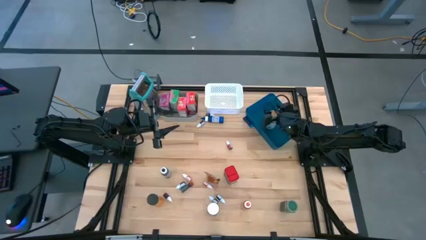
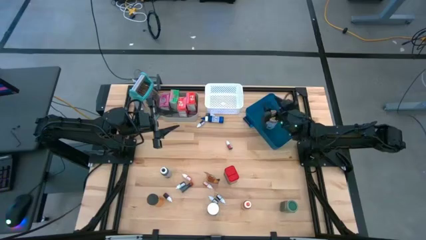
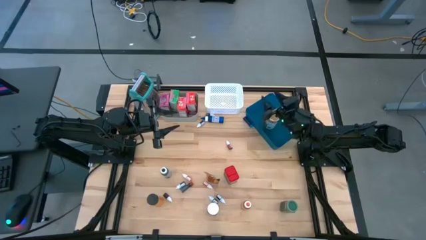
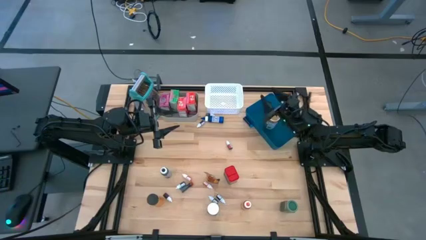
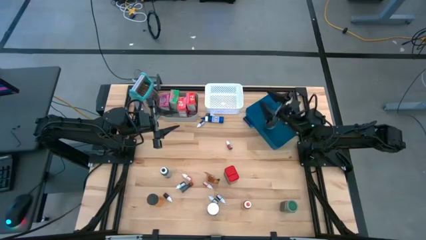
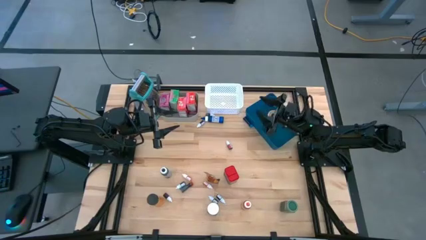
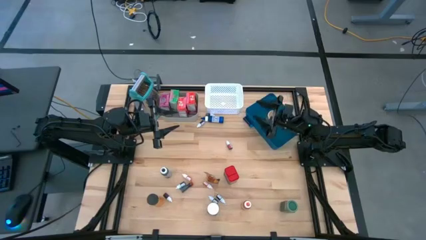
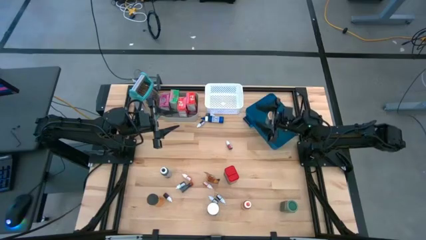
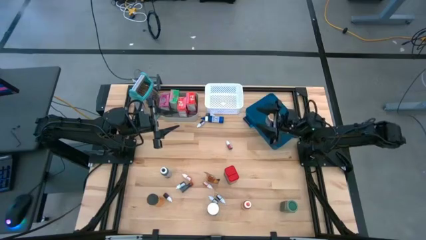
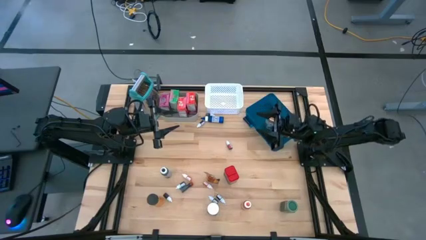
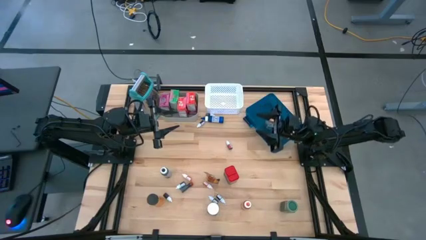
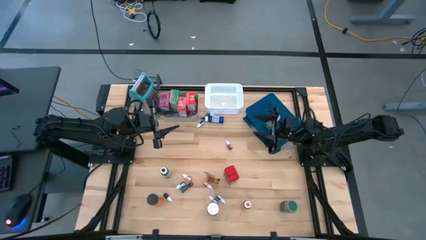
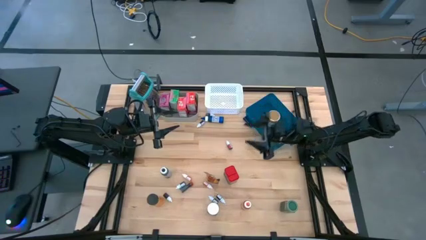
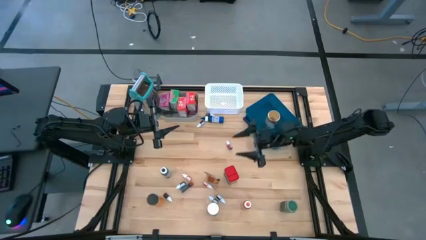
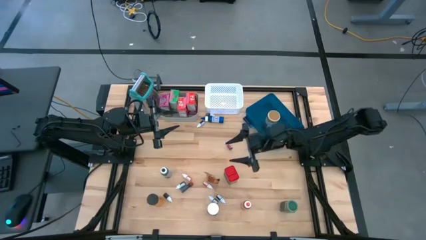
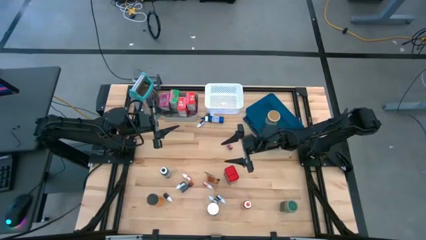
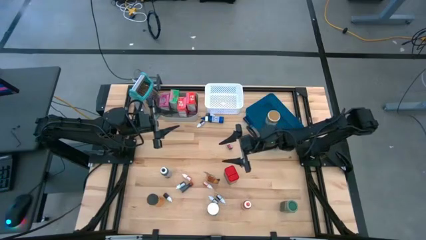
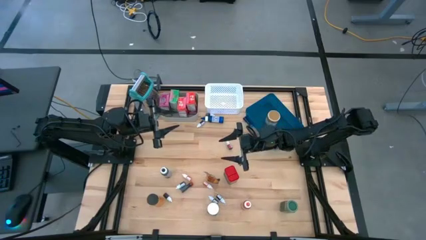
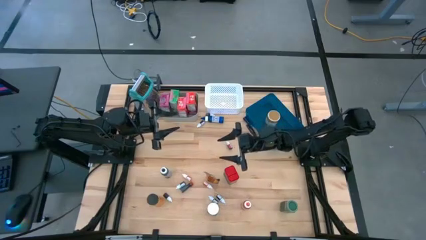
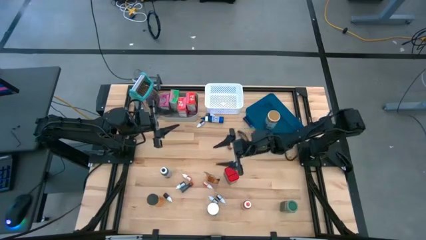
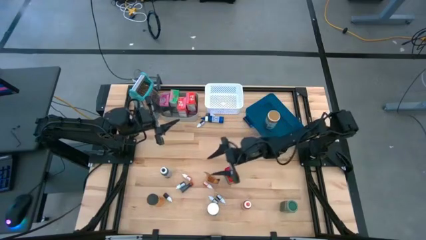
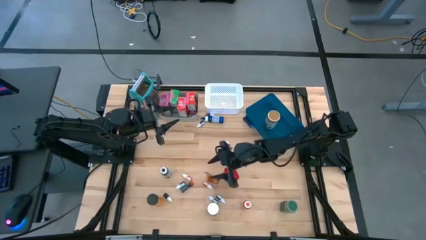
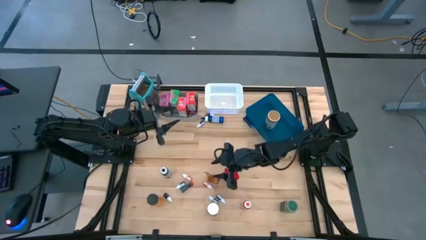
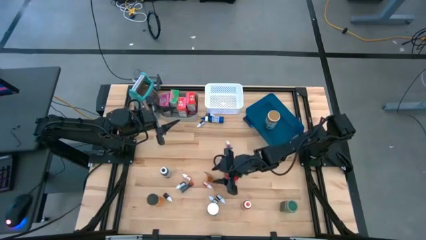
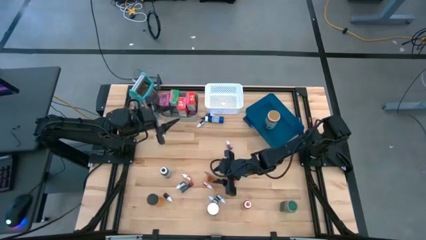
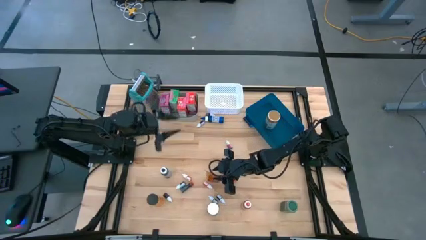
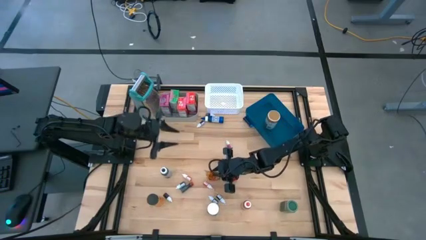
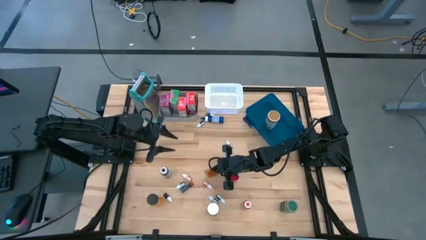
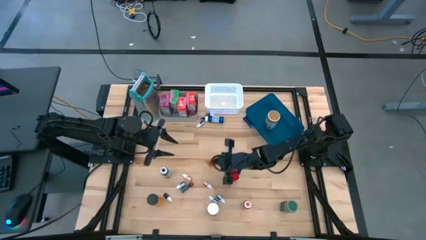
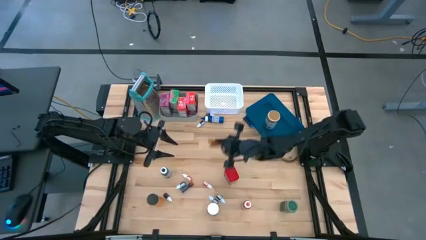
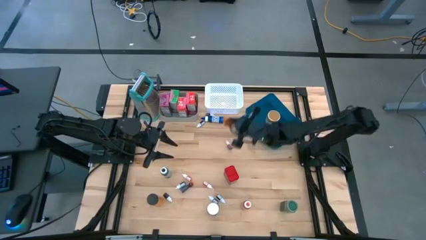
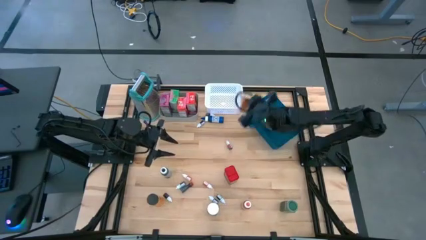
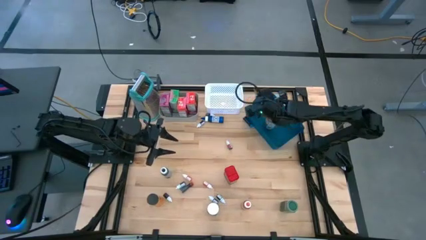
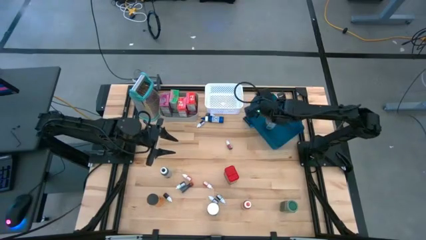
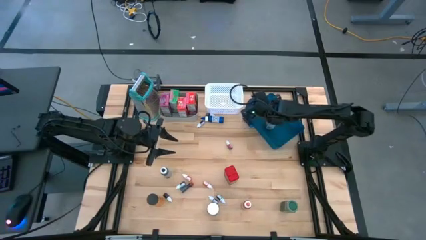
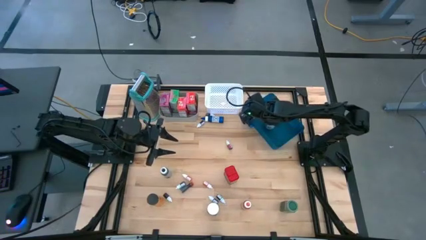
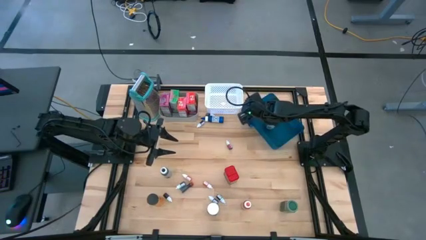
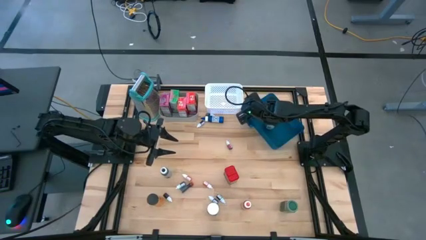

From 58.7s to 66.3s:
Task: Pick & Place Kitchen Items
Put the orange seasoning pack into the blue bin

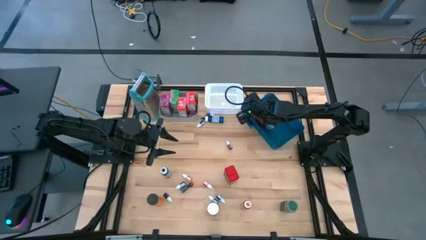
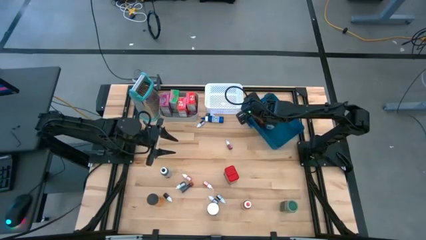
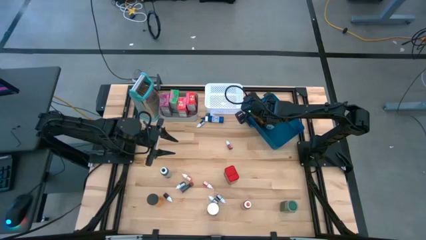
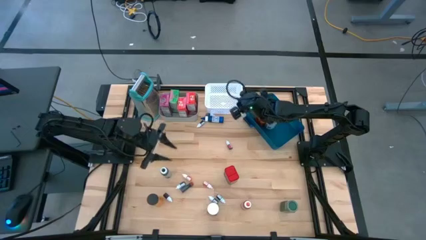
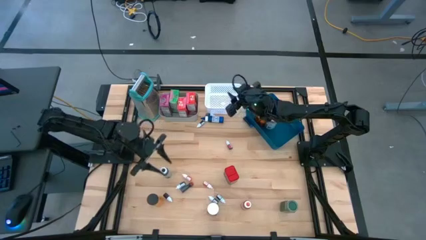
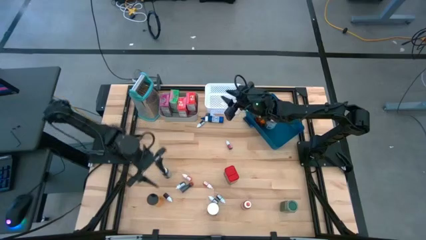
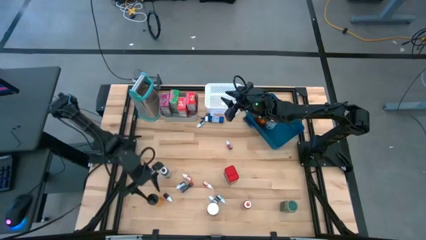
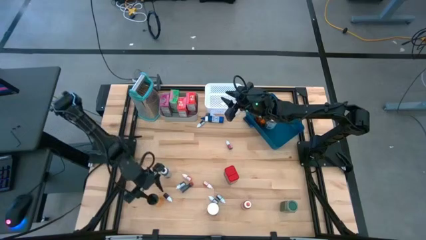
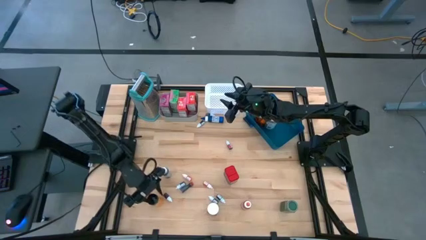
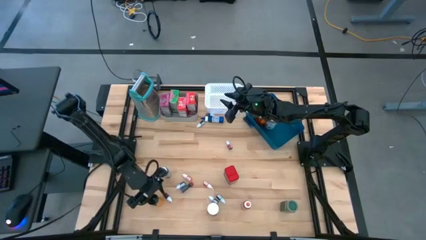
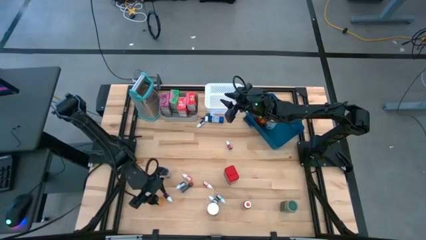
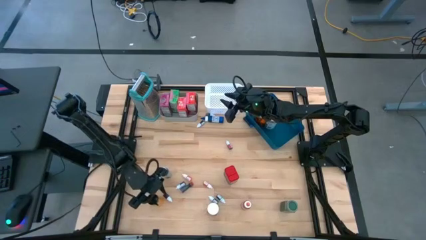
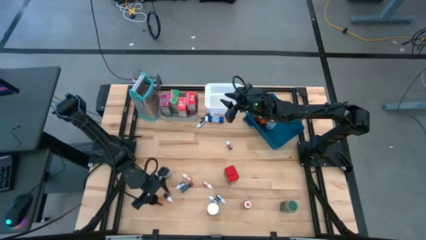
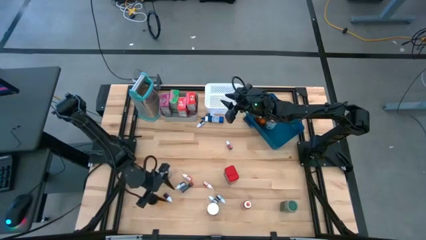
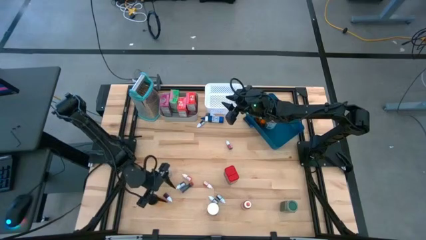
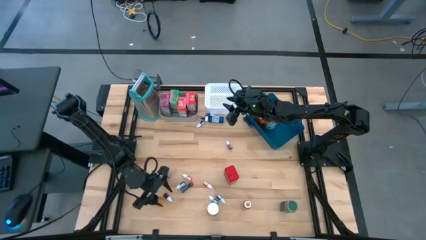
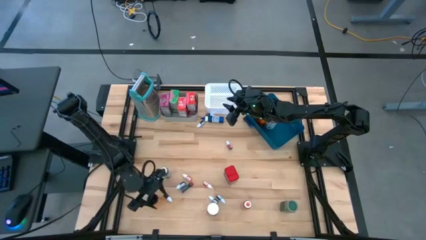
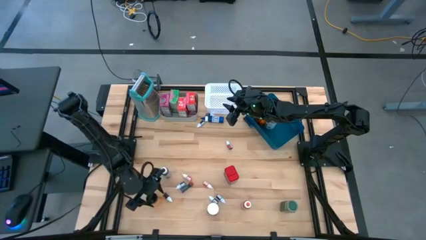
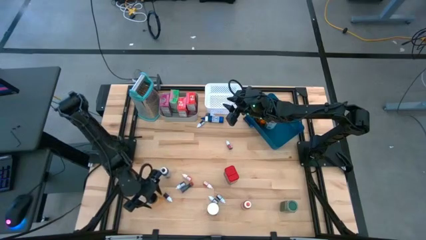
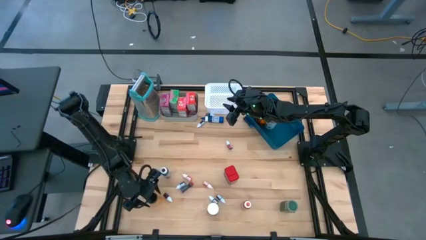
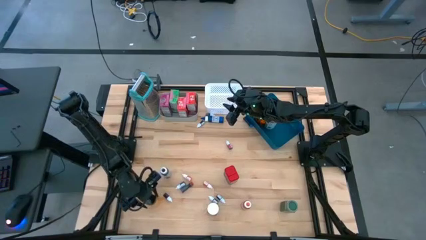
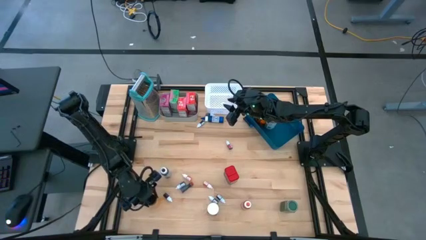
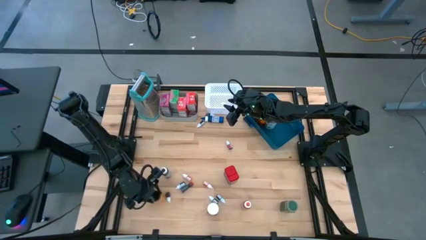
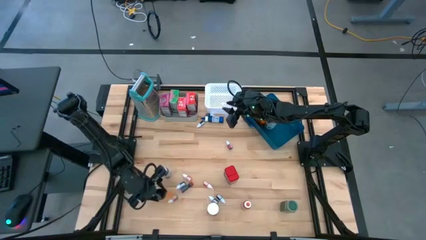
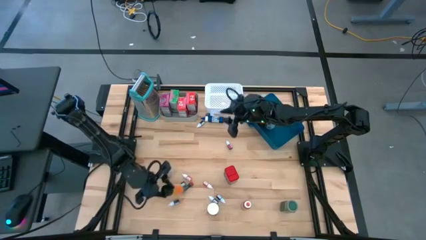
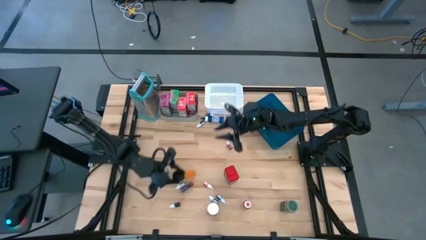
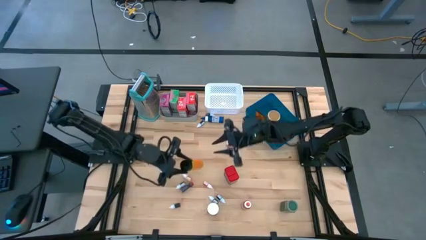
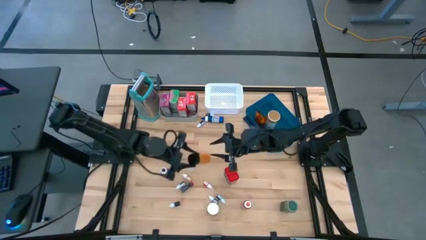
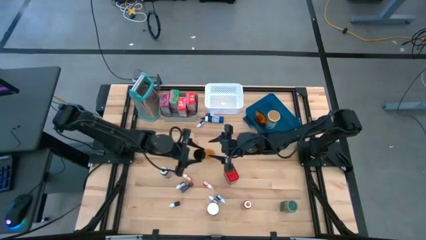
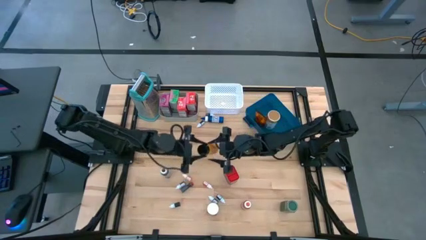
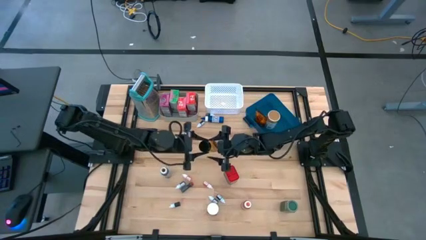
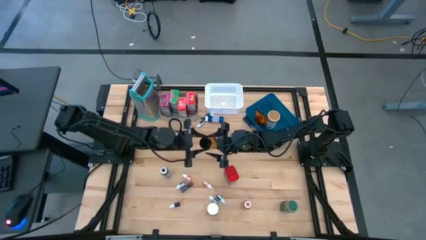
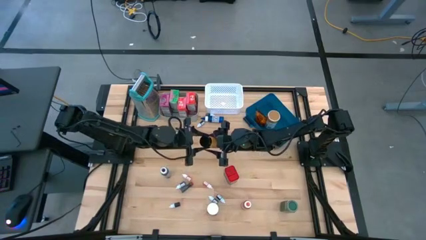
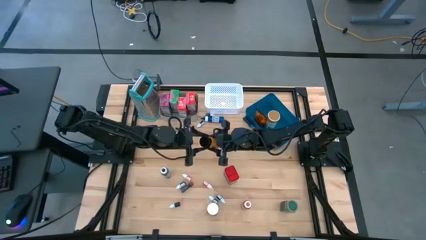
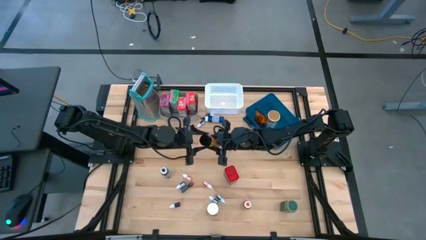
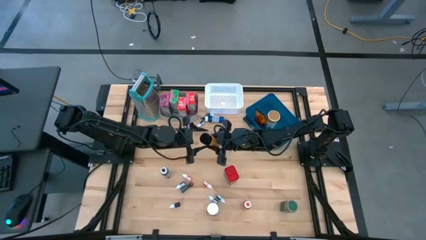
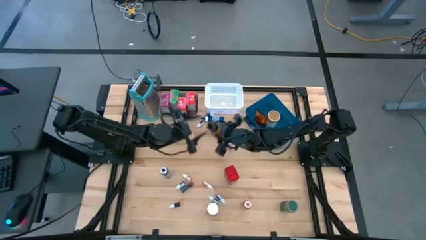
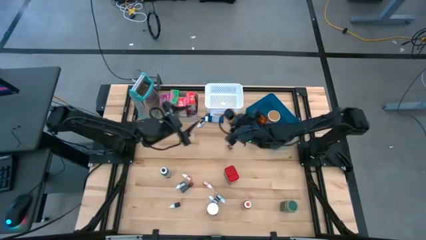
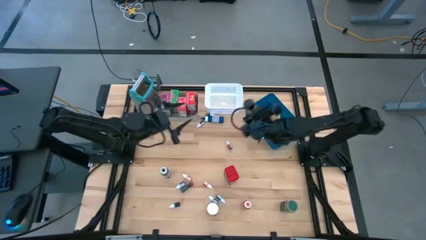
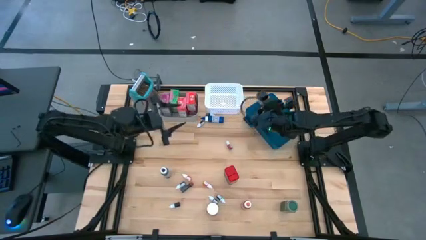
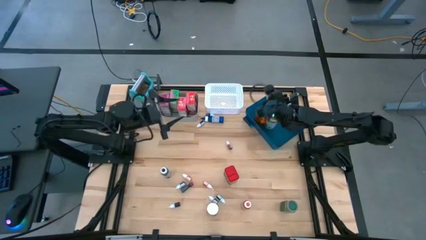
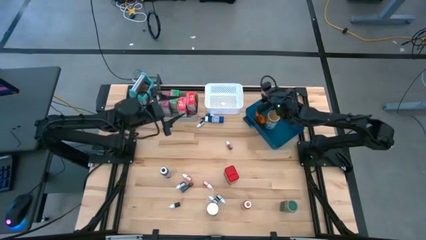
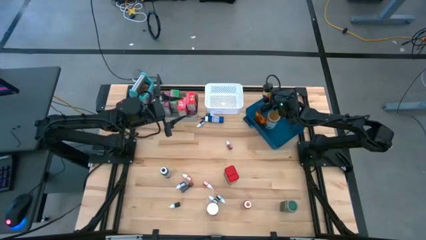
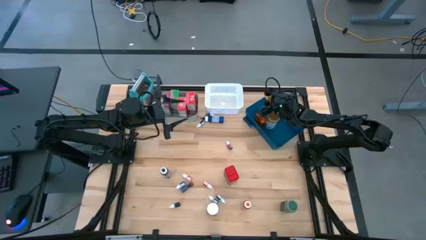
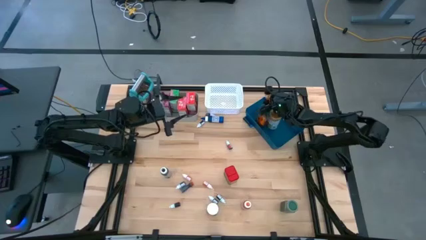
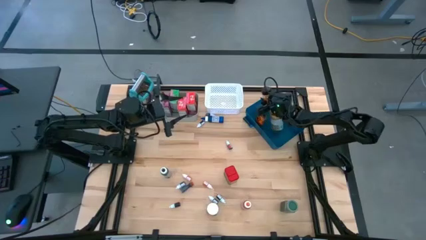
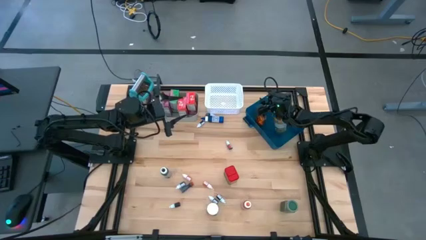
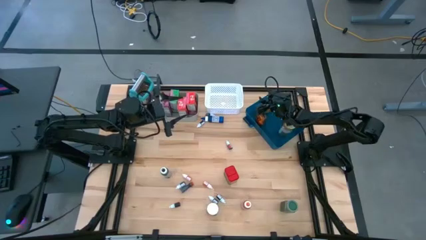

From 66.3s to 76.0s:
Put the orange seasoning bottle into the blue bin
